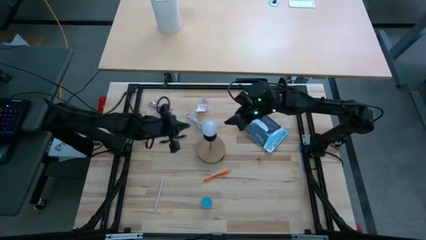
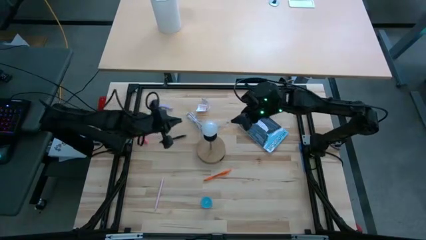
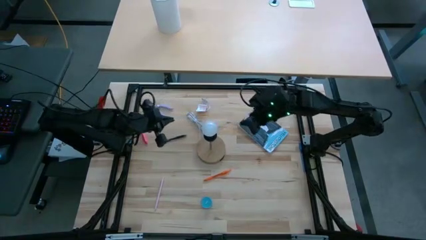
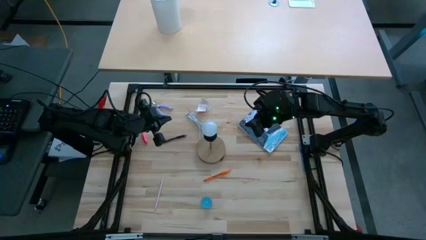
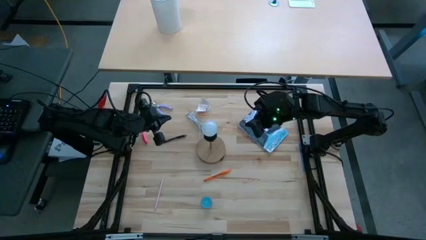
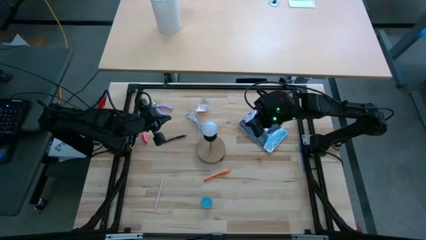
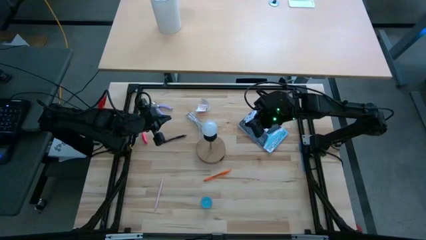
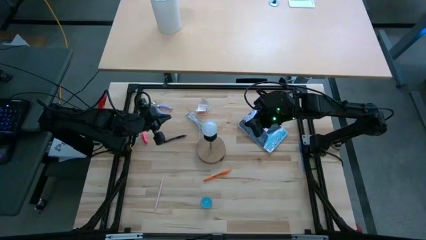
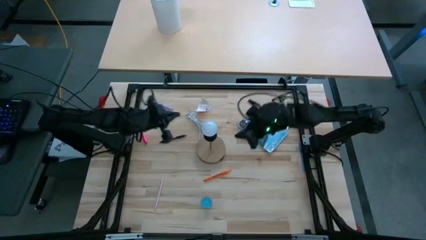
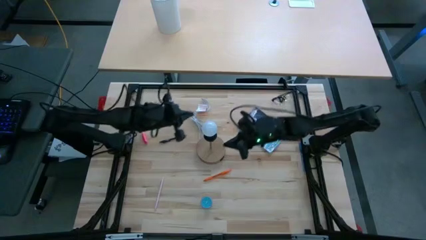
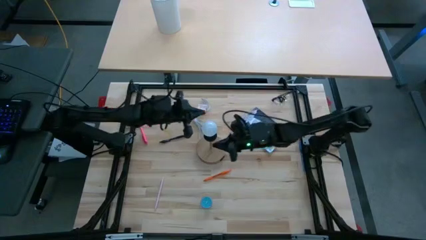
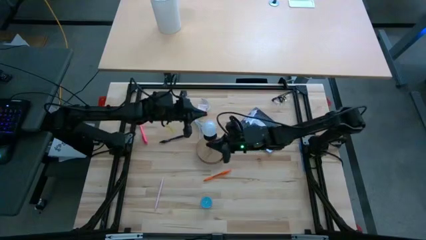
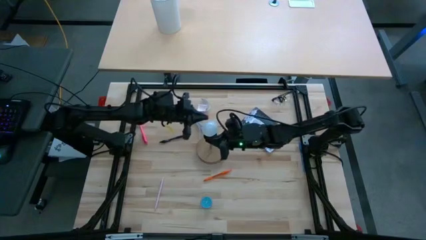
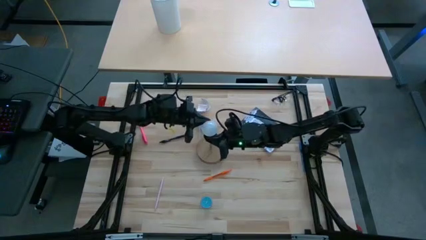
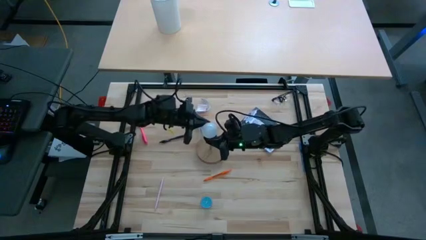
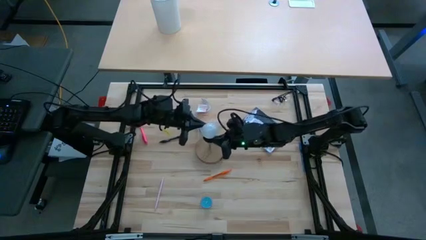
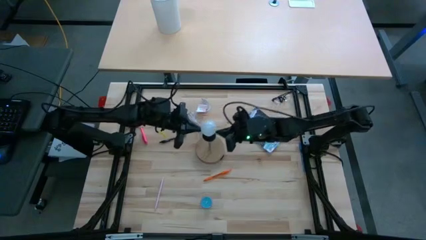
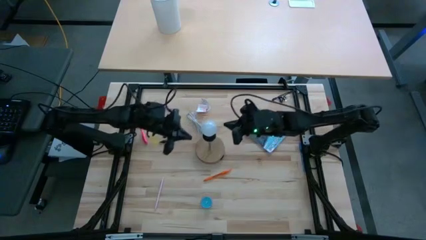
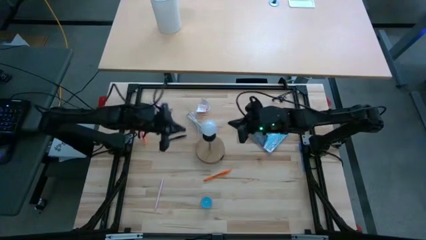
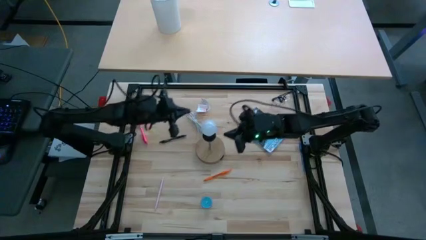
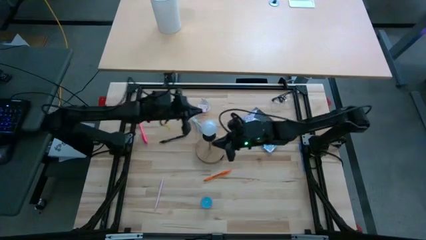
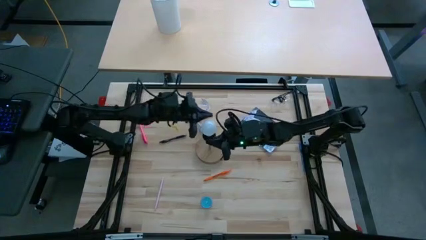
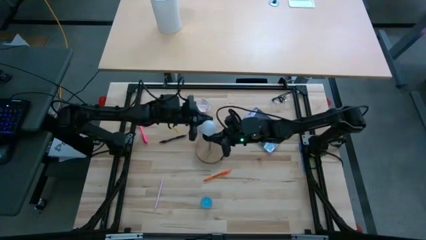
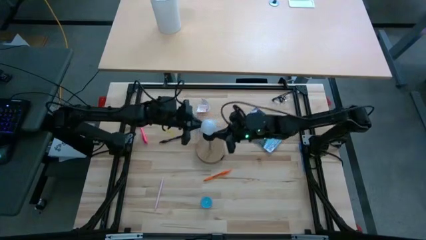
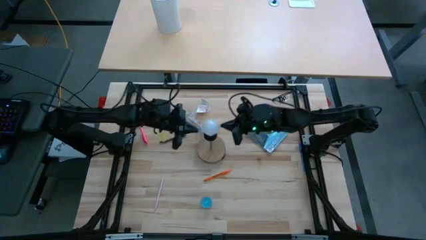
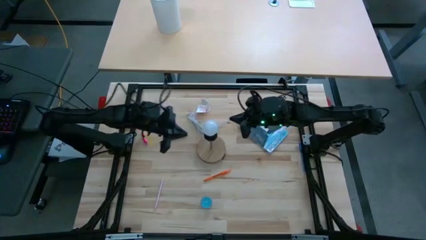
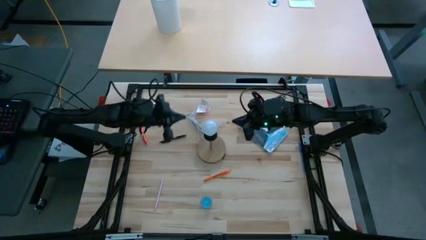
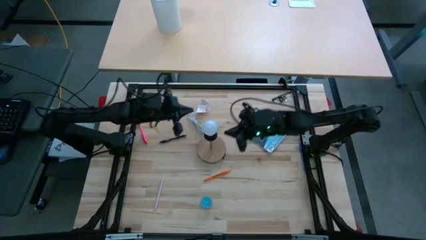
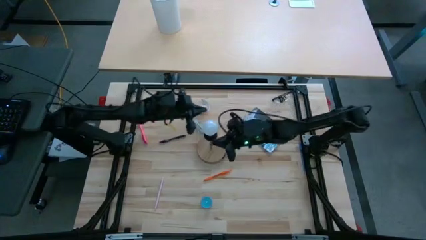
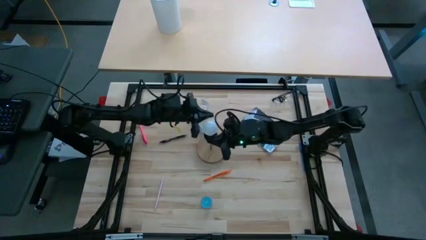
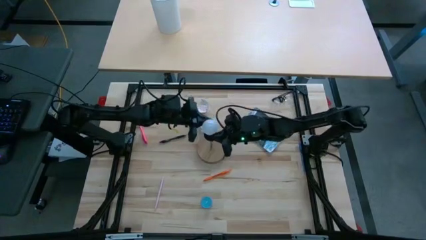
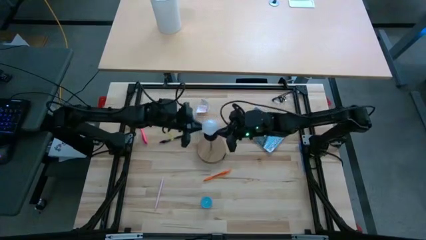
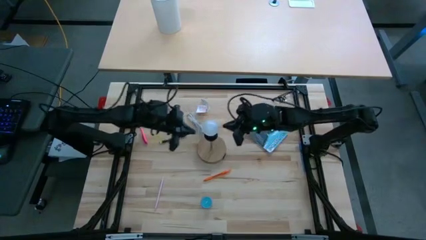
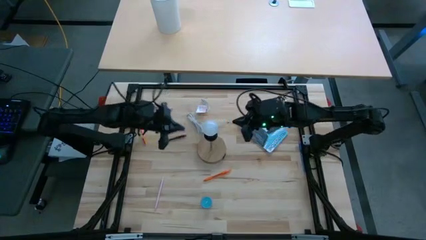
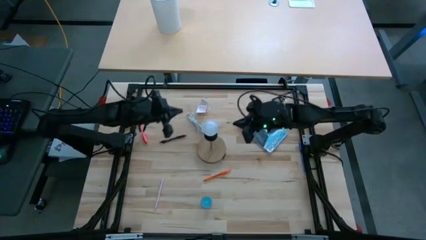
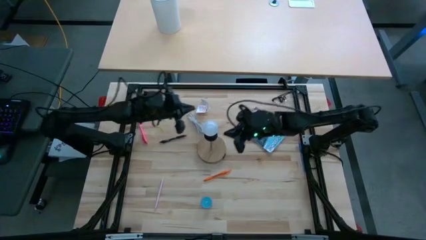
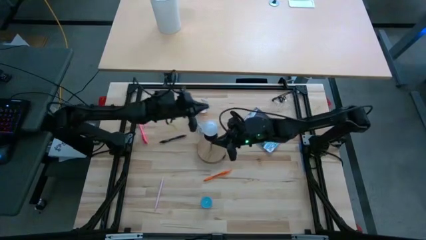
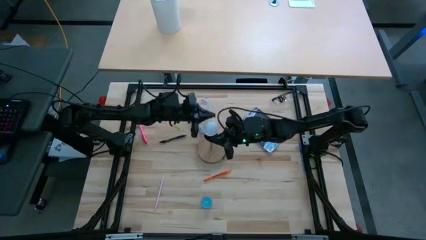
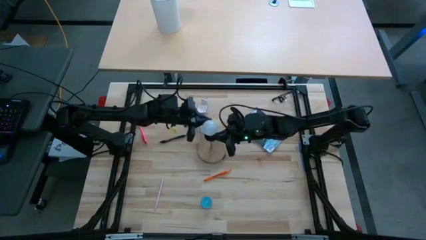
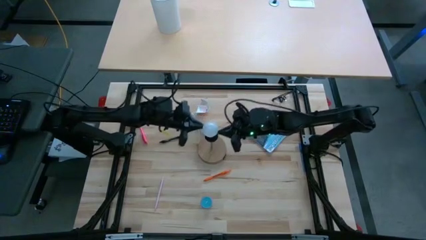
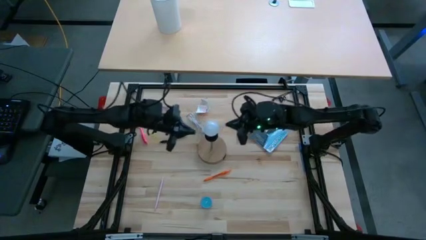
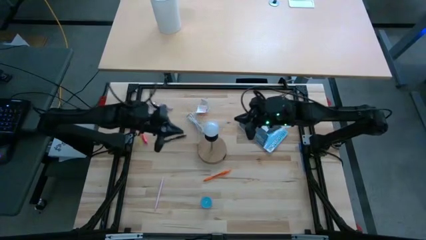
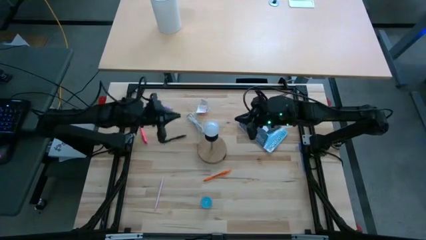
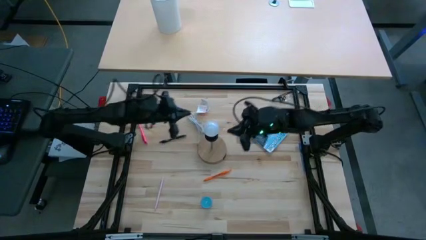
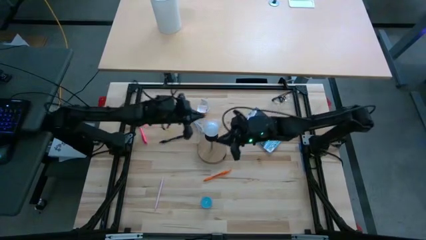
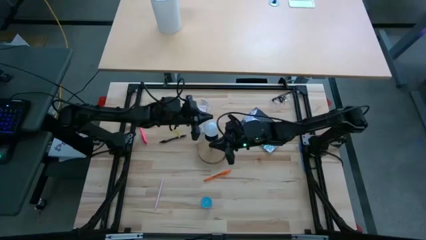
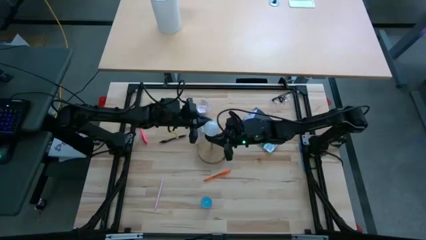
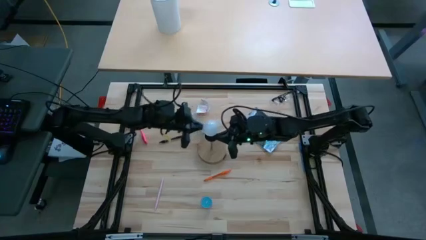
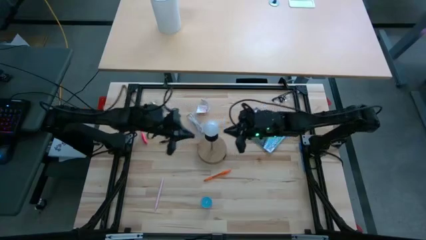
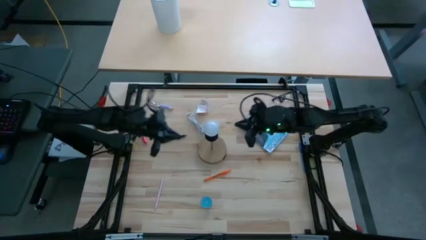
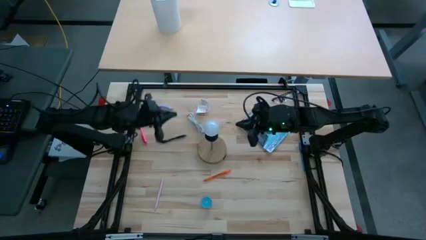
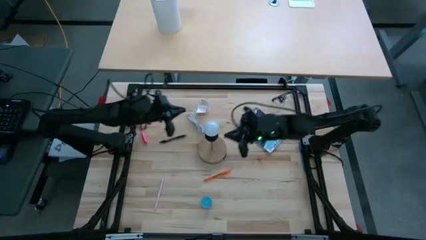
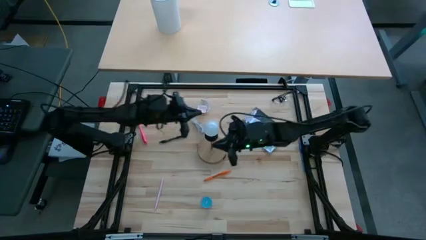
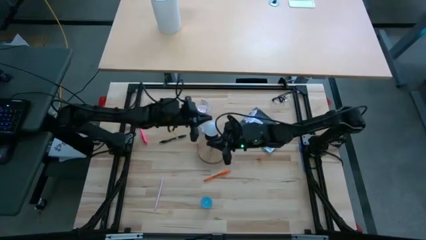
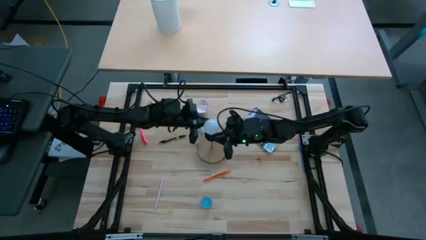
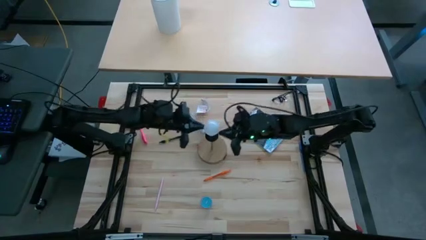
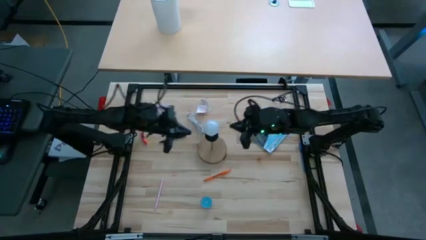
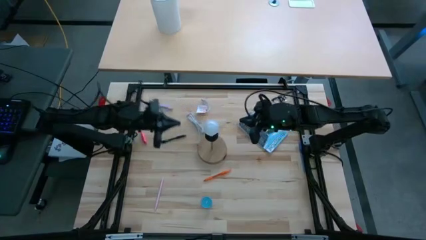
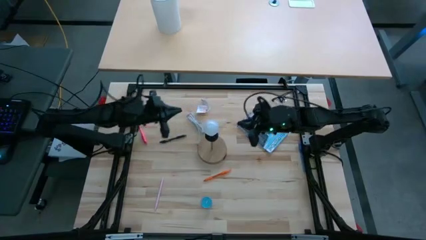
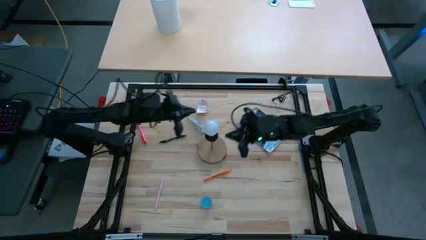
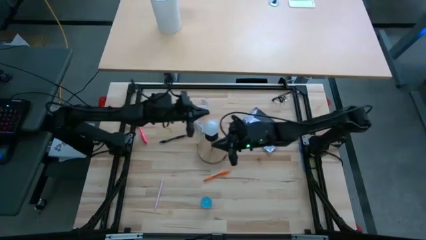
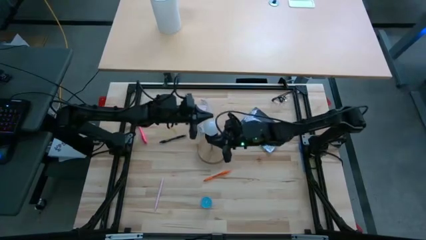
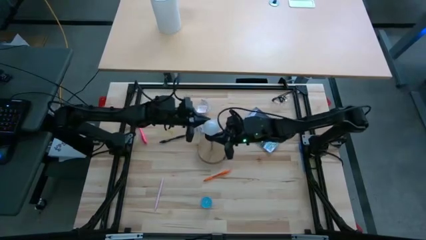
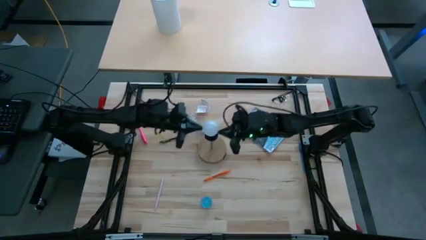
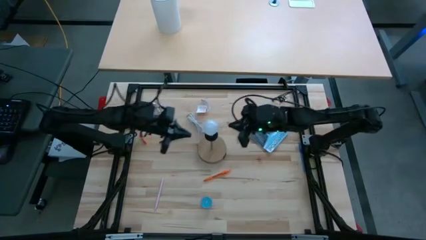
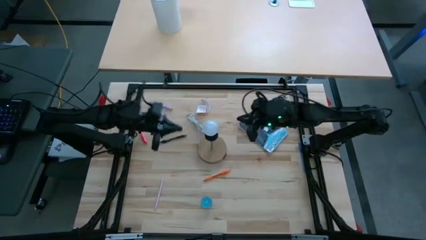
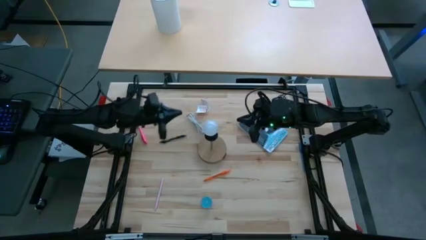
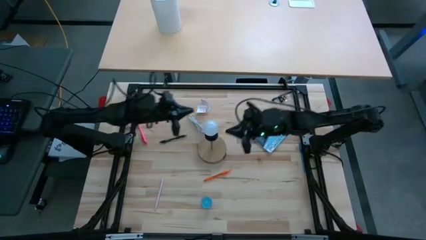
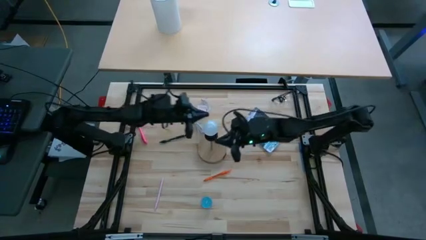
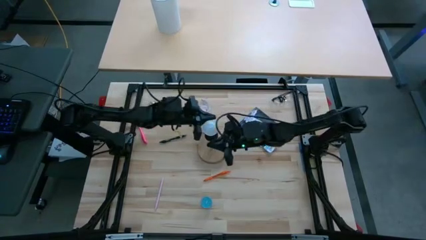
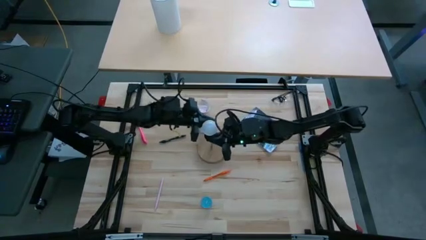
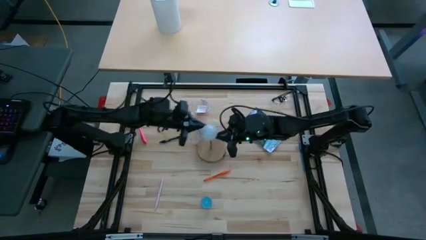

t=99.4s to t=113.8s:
Task: Screw lightbulb
Remove the light bulb from the lamp

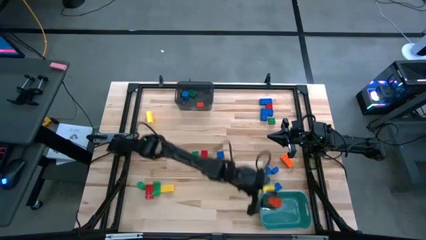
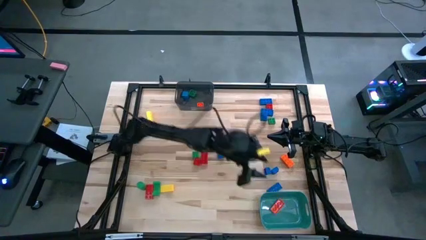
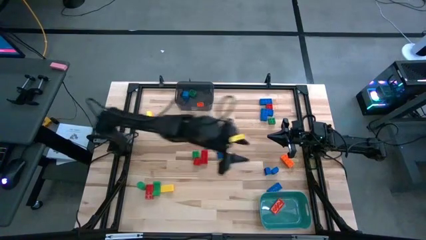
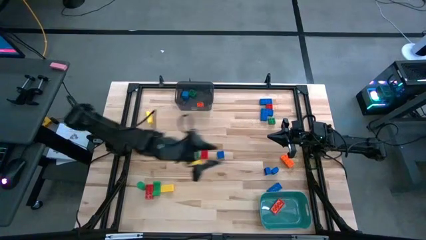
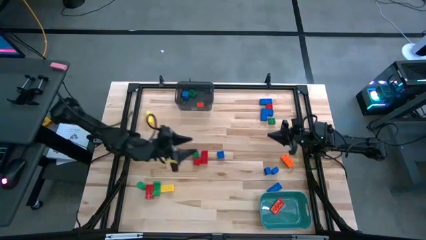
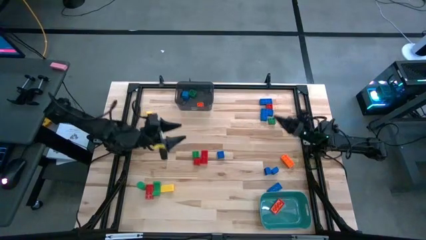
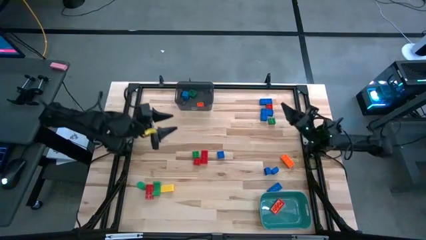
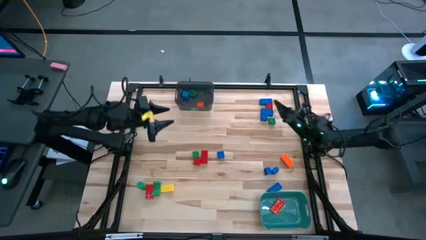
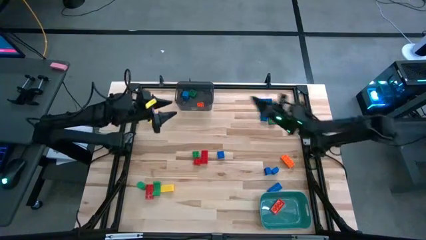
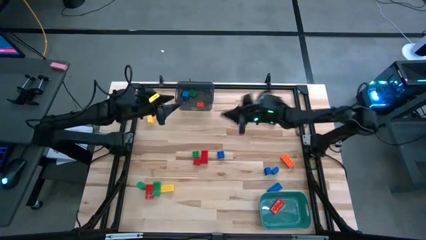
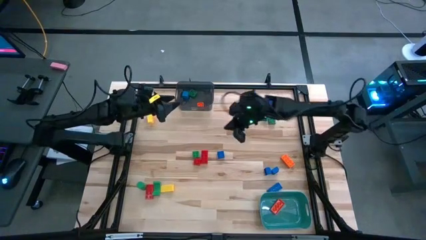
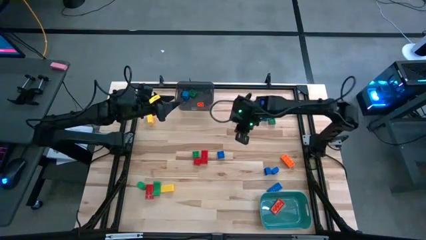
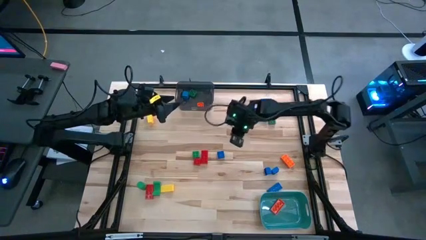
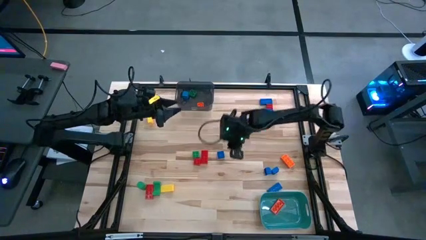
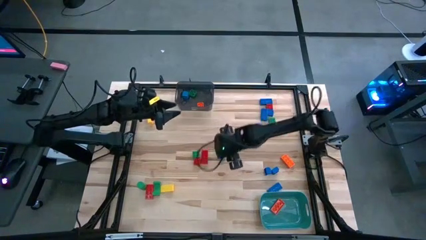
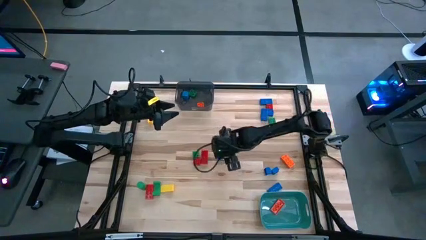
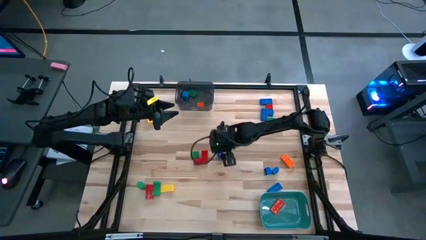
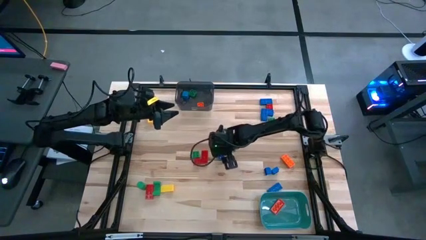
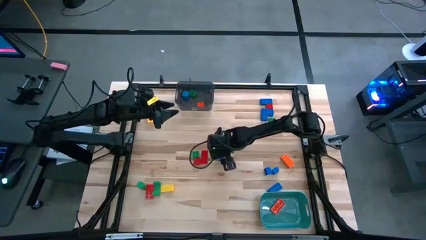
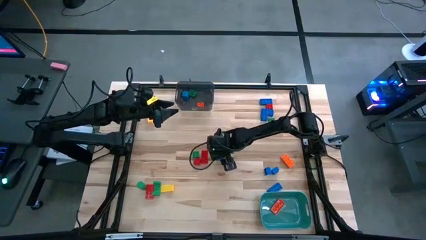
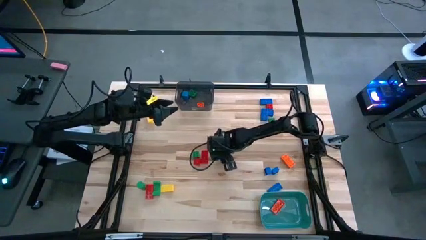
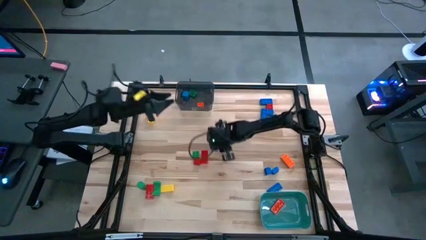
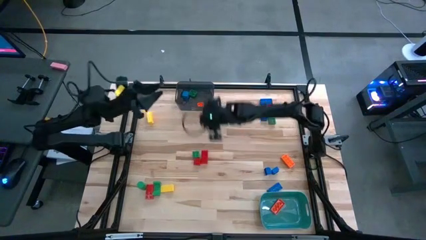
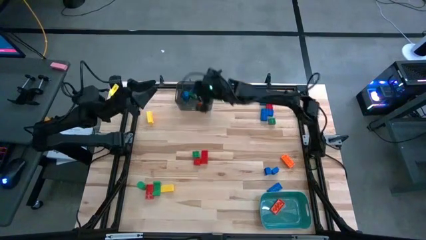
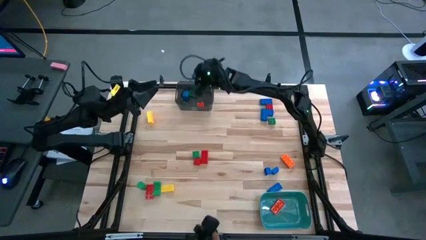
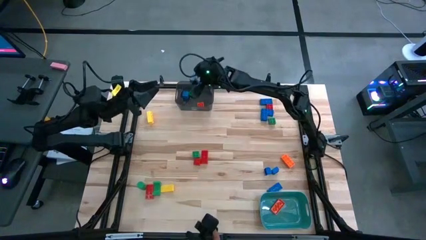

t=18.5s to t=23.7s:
Task: Sort blocks by size
Put the blue game piece into the black bin
